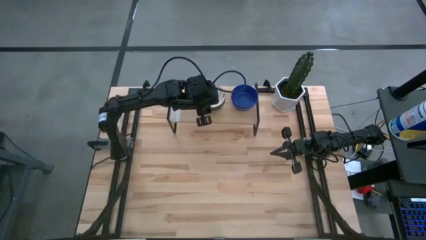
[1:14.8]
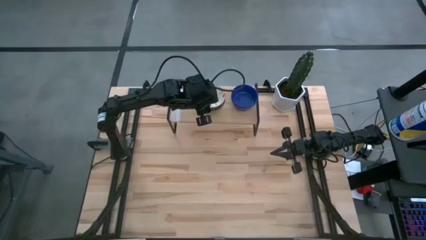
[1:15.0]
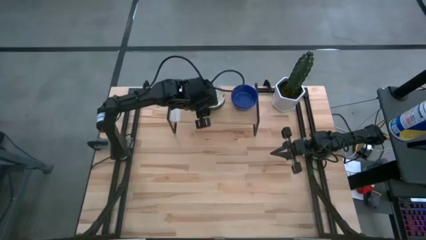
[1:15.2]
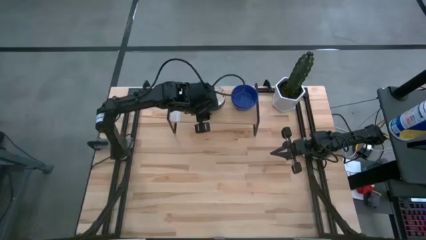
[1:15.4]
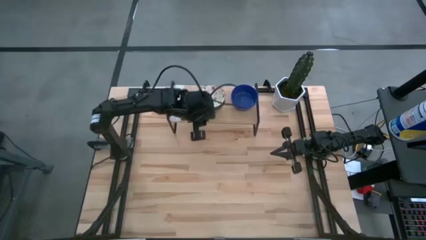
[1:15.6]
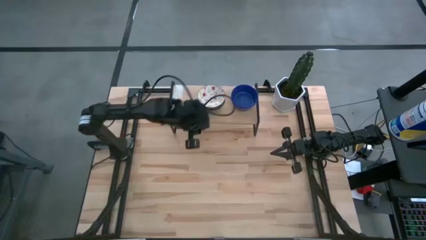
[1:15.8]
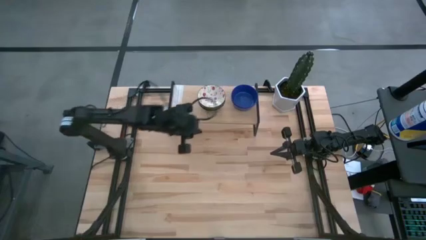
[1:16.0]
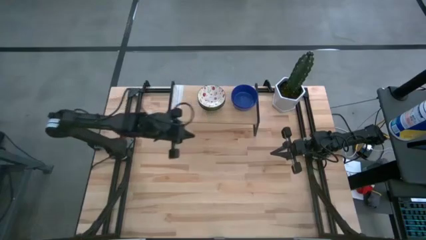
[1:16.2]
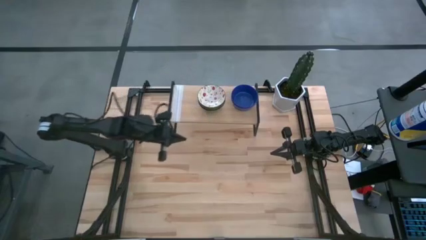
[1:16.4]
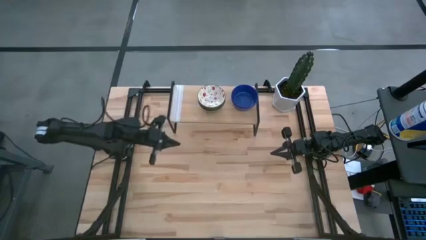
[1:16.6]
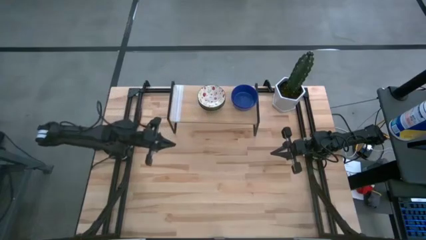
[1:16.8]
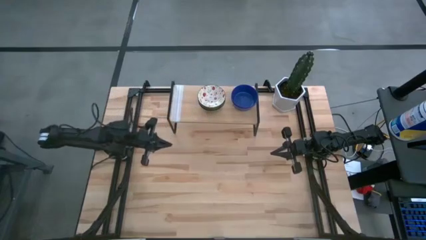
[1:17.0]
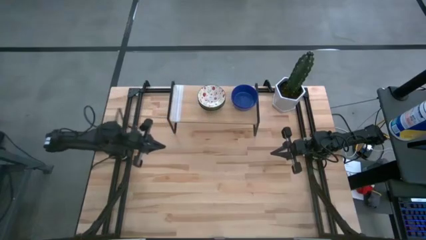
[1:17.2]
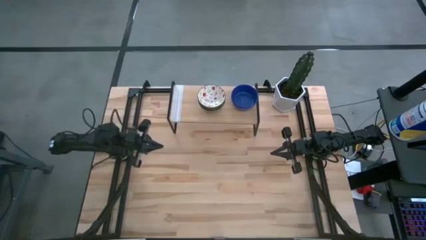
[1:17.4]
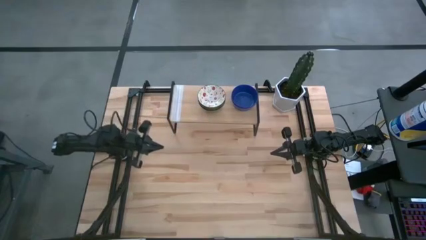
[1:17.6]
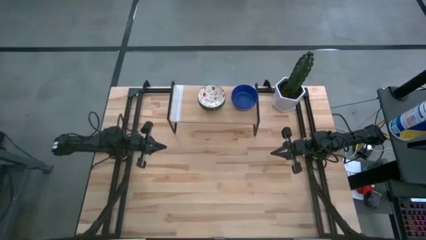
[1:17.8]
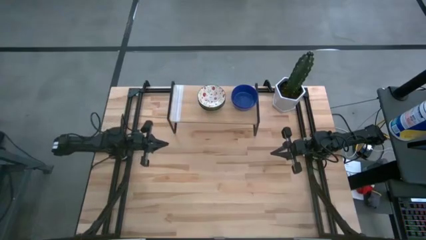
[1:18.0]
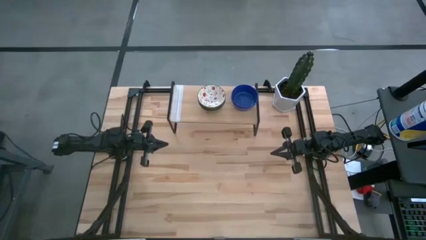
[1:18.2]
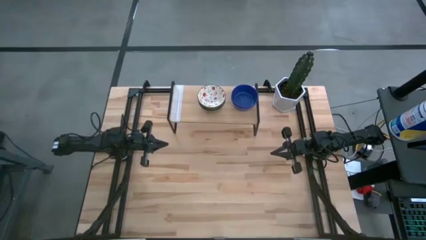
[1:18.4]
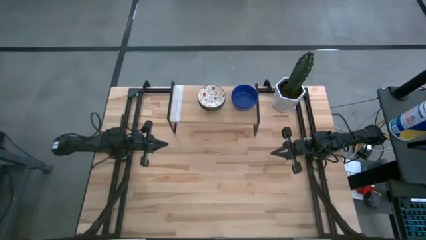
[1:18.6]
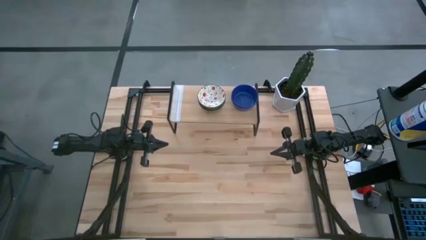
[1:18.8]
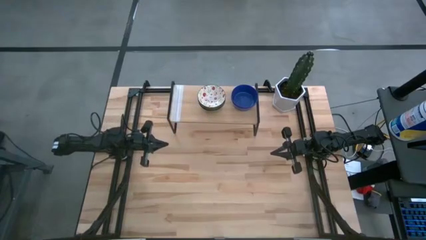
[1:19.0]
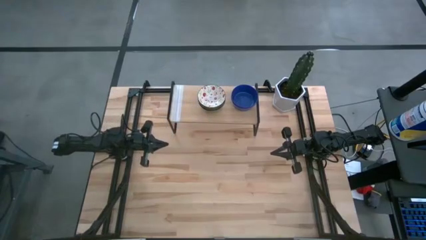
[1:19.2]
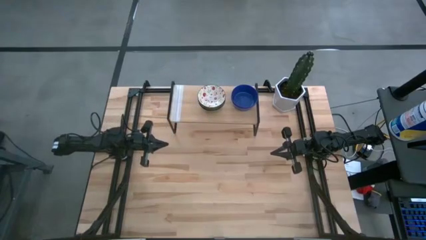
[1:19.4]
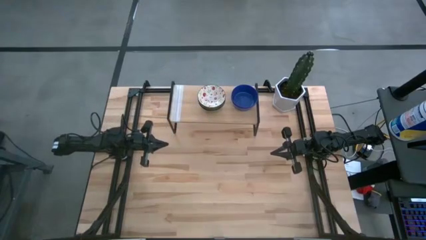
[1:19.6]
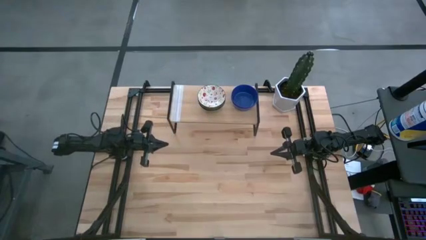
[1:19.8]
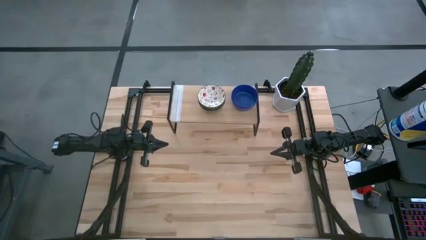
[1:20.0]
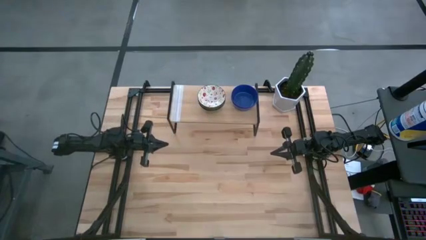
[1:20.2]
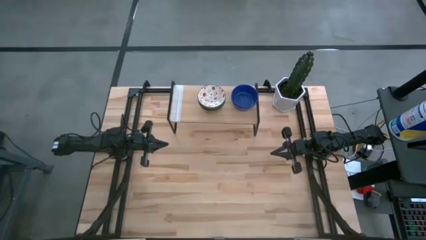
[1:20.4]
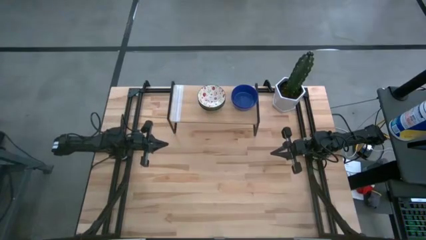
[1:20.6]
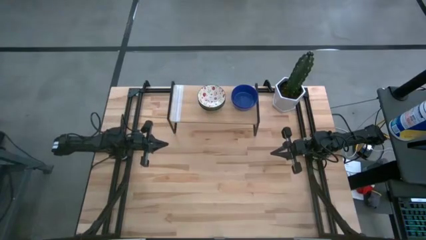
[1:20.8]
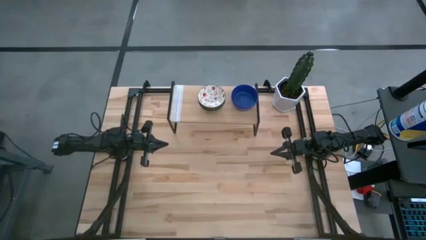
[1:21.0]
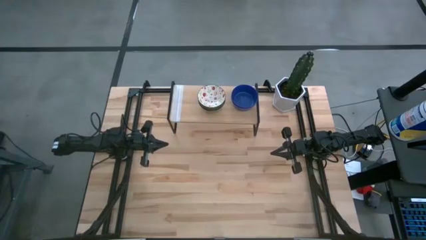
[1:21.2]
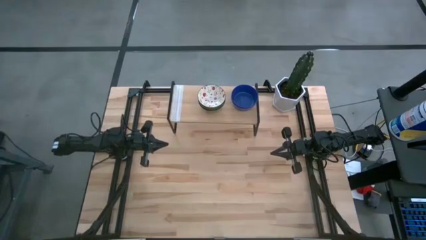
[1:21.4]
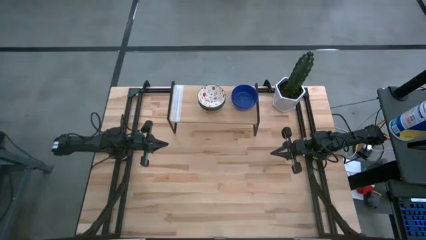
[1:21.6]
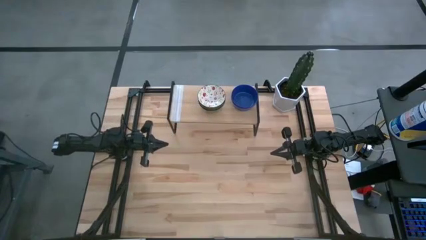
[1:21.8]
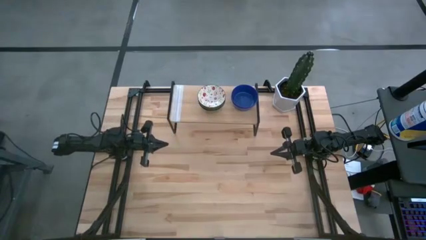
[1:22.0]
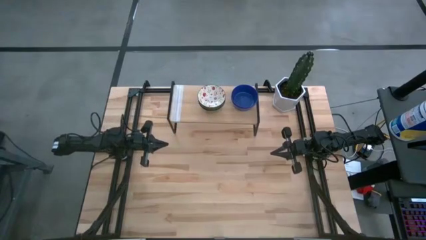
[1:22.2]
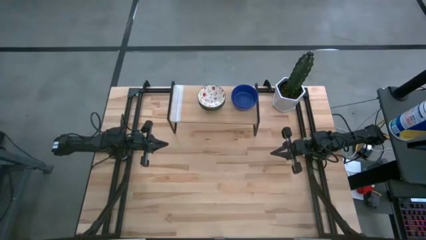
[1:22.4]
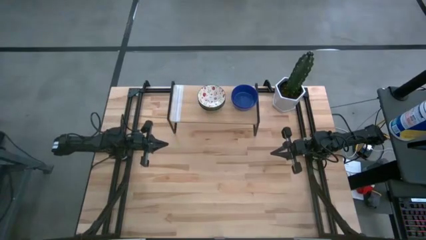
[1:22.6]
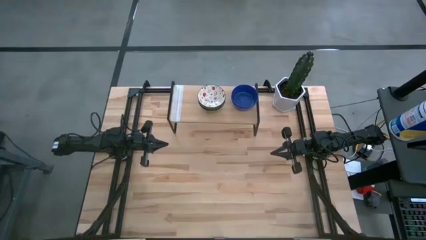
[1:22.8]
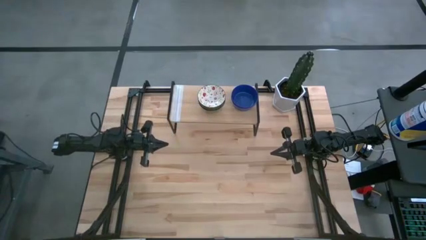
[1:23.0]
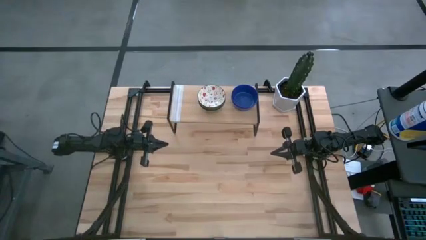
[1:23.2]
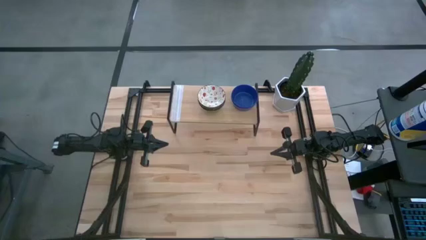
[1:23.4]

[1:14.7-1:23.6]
Task: Pick & Place Mini bowls
Return to Home Position

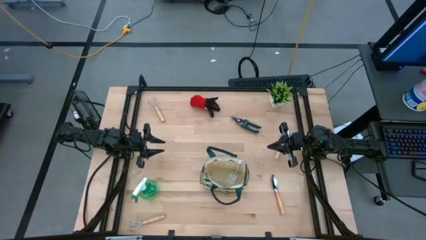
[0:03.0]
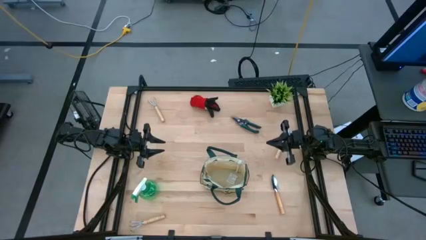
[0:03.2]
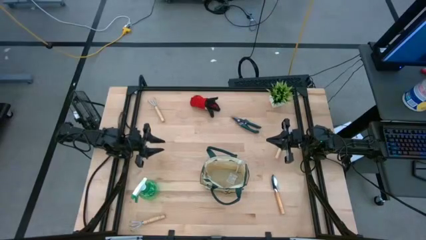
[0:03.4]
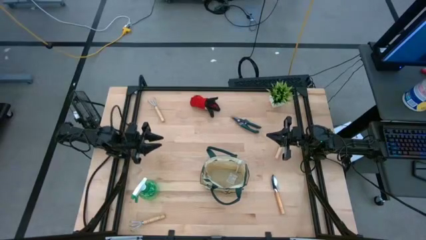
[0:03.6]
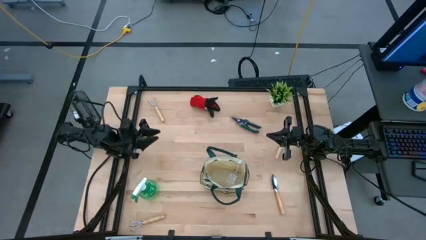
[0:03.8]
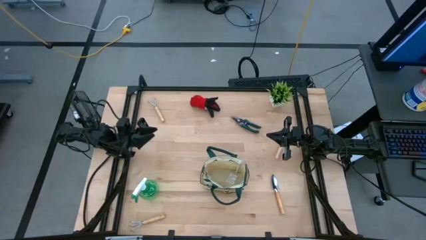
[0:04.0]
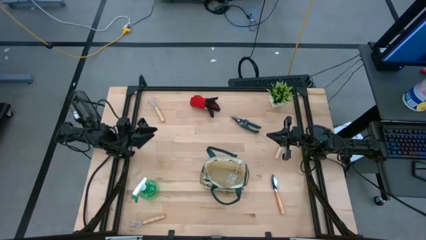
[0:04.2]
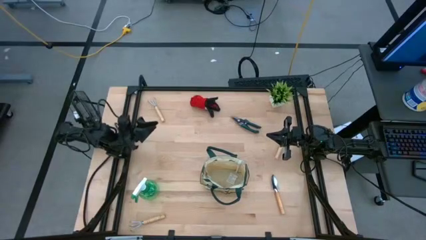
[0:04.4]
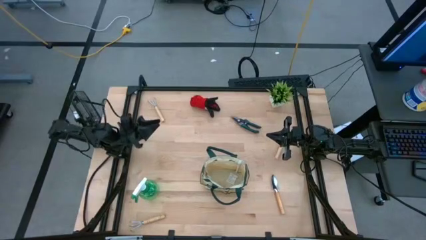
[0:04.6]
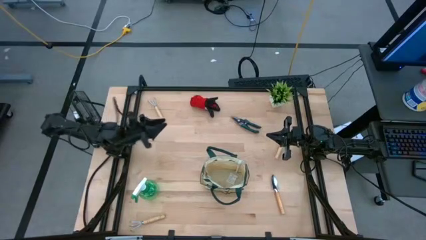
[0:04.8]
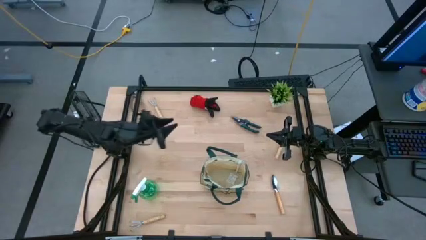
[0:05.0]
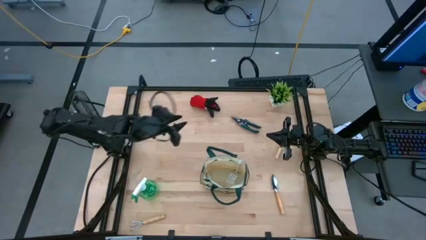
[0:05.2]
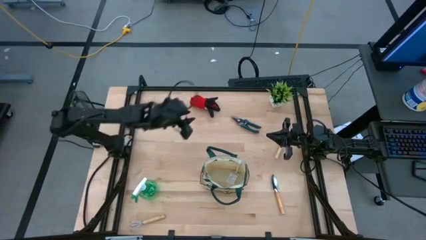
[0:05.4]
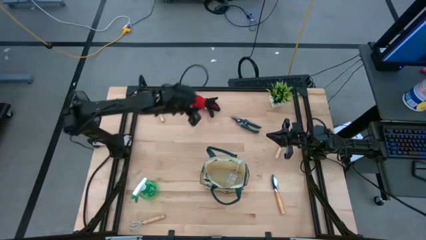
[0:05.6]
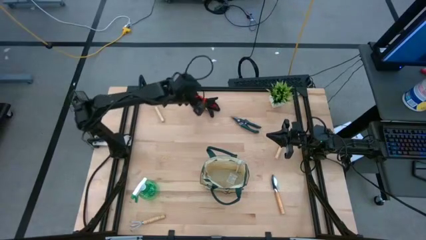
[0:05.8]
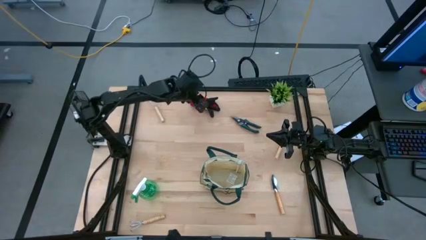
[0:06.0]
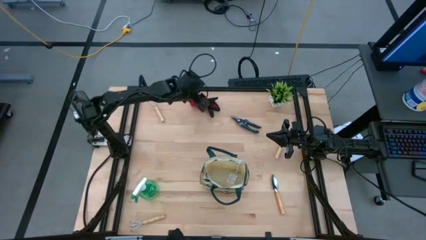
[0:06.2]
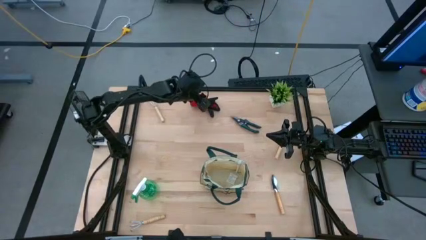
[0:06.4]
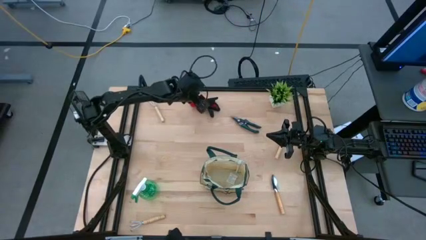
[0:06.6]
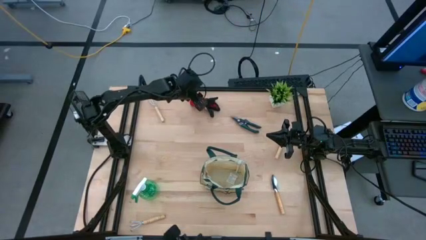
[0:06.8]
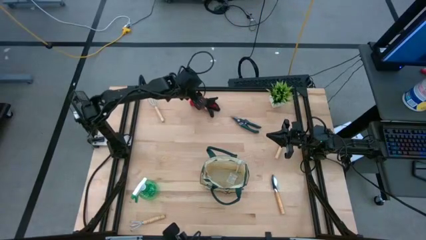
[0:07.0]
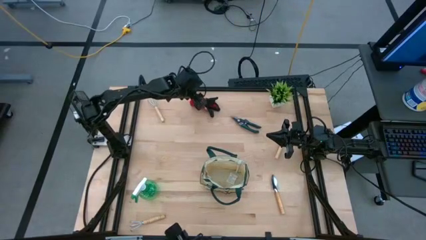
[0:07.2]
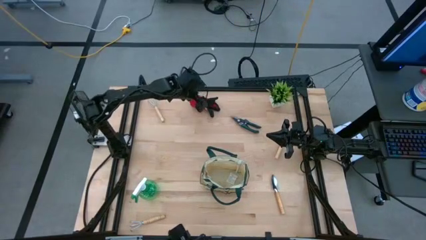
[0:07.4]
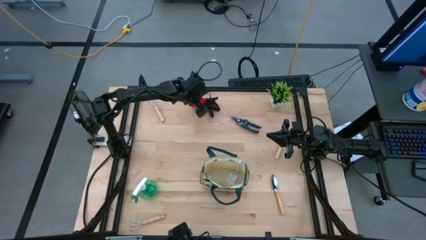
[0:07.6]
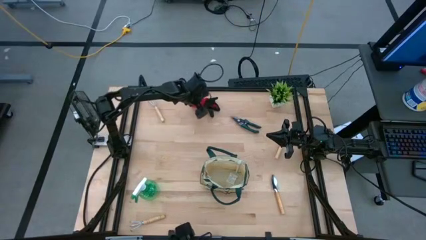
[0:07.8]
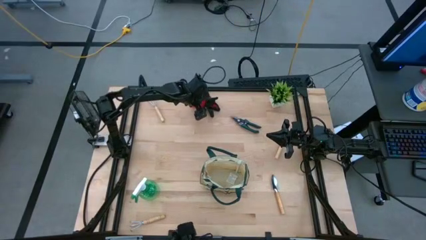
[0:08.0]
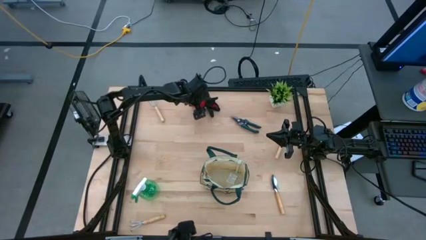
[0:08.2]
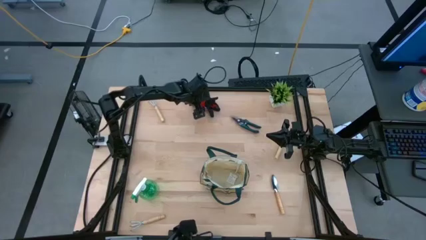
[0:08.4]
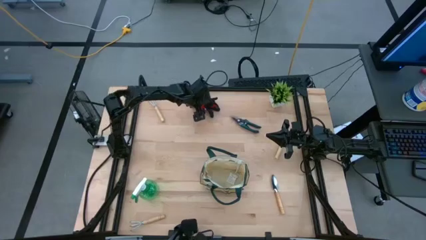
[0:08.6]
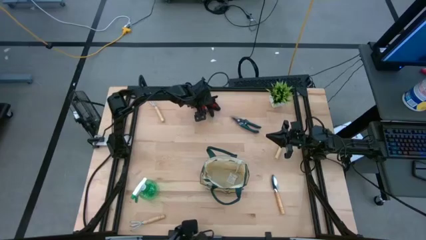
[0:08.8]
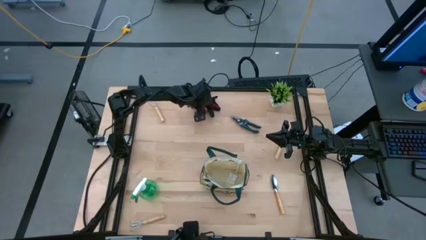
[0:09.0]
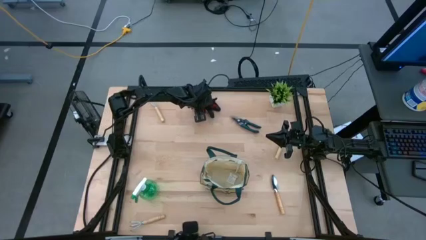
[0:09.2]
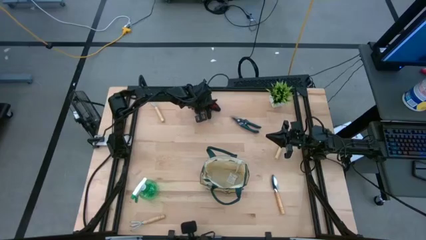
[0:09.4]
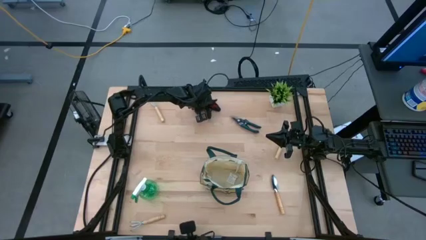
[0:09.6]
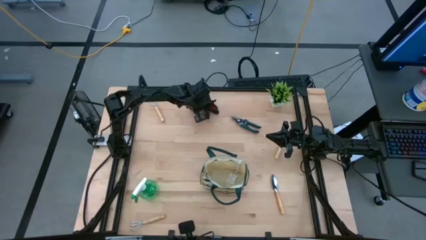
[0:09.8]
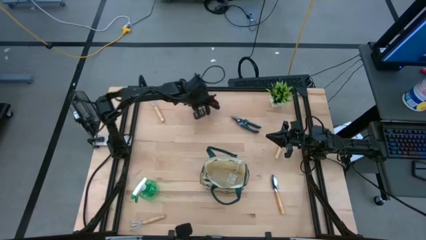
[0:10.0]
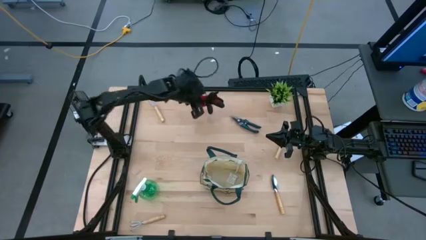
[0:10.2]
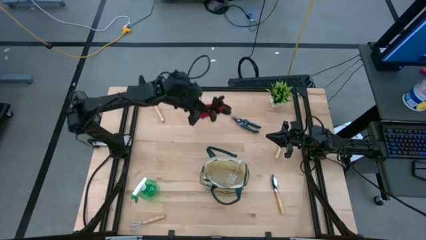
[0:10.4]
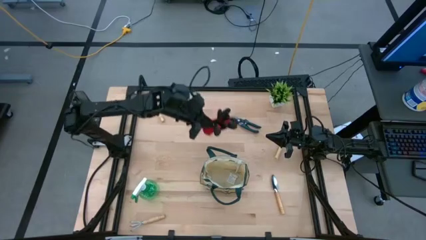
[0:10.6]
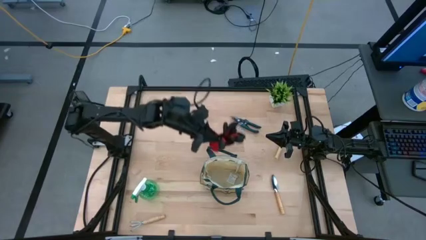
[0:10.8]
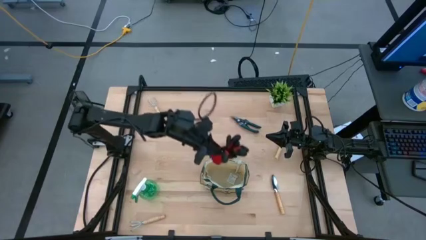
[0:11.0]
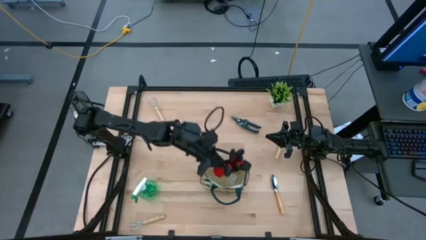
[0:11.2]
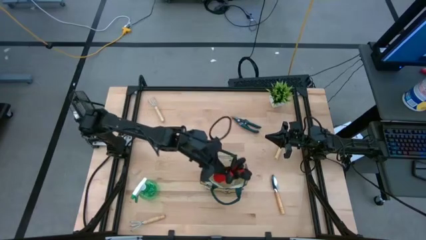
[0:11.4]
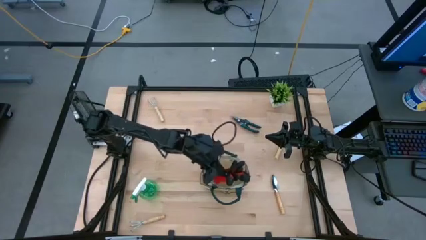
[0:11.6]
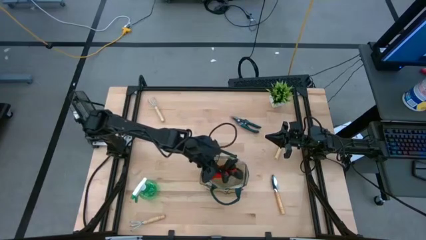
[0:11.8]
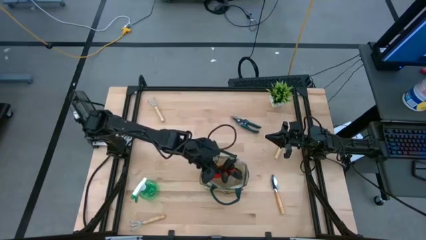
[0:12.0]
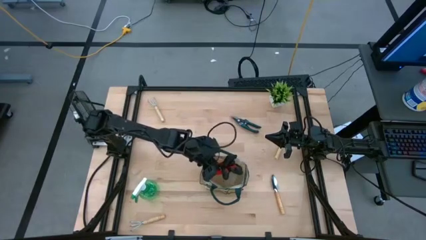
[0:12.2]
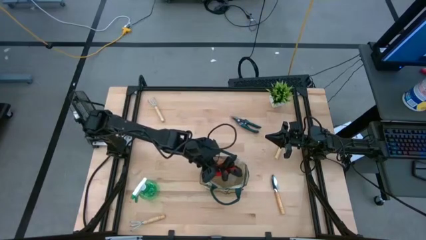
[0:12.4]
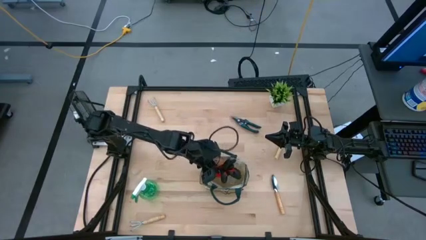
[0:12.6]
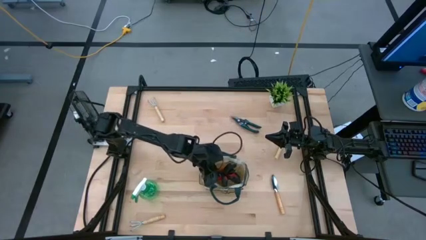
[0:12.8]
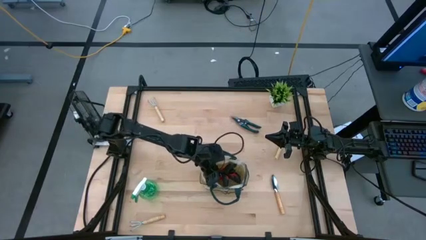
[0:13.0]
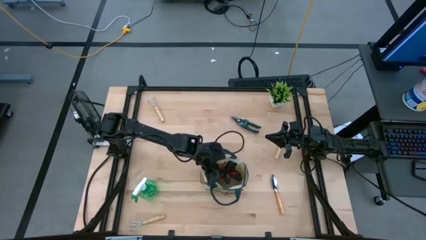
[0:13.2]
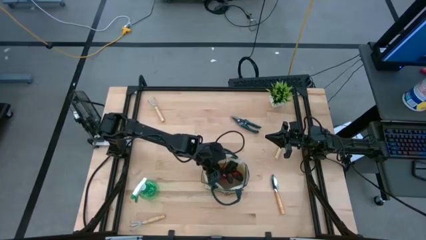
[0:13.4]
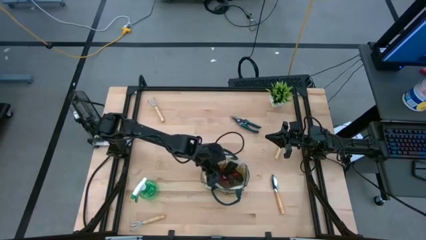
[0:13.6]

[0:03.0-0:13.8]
Task: Pick & Place Garden tools in Gardening bag
Put the red gloves in the gardening bag
